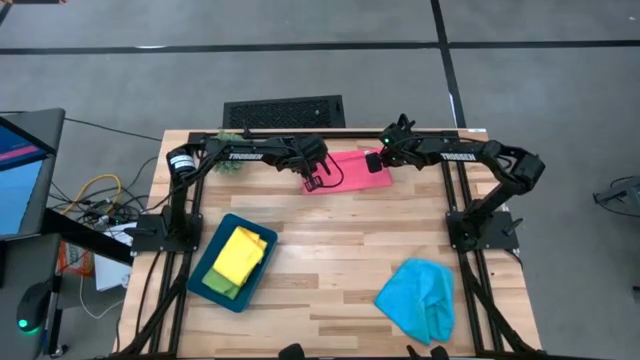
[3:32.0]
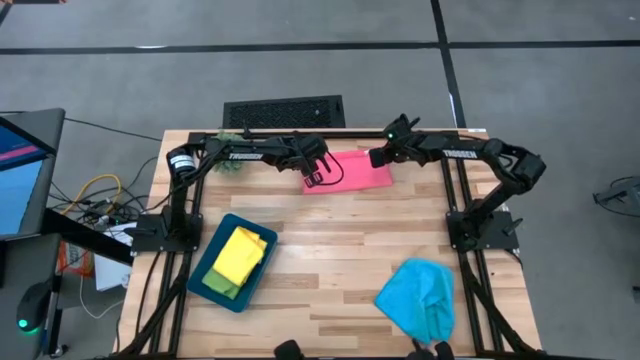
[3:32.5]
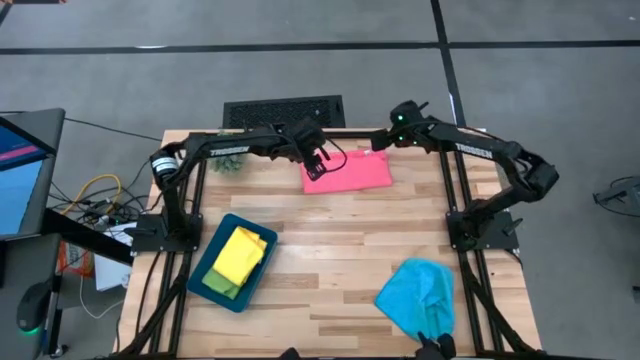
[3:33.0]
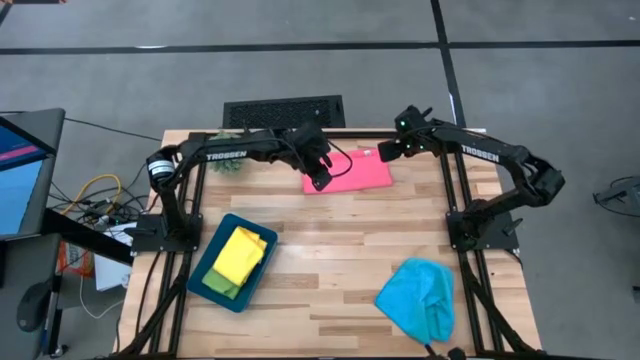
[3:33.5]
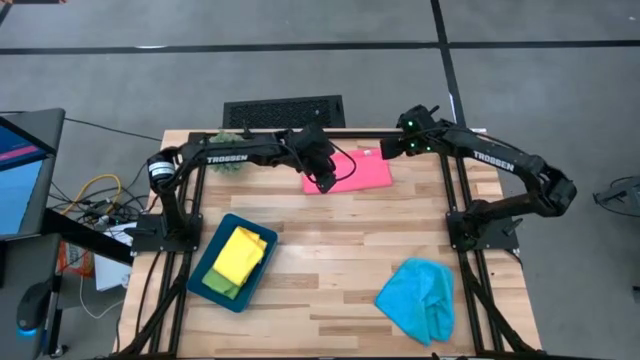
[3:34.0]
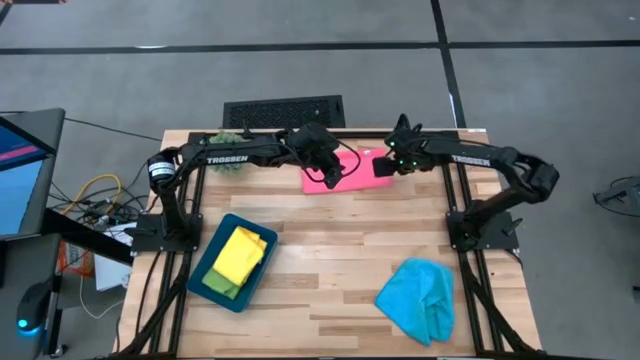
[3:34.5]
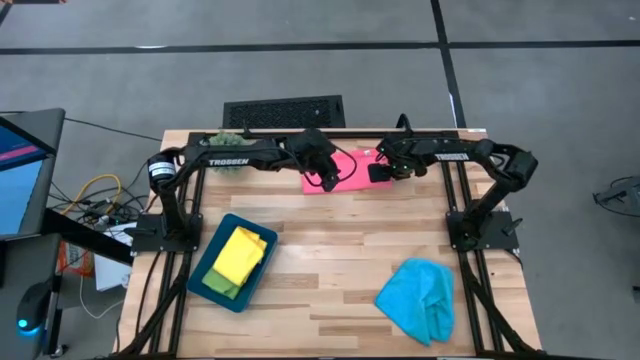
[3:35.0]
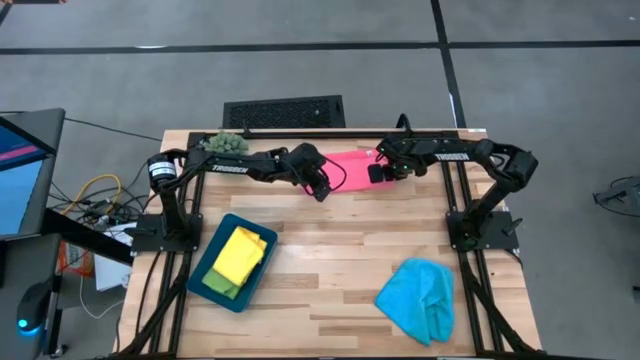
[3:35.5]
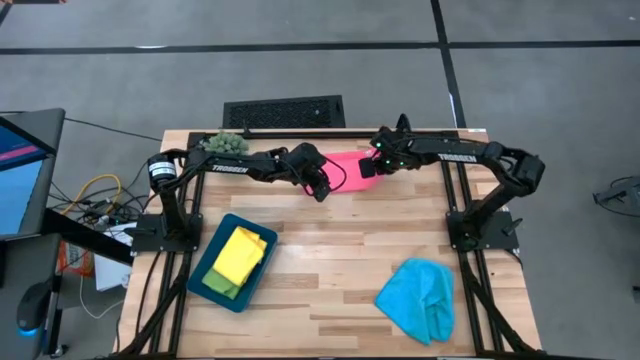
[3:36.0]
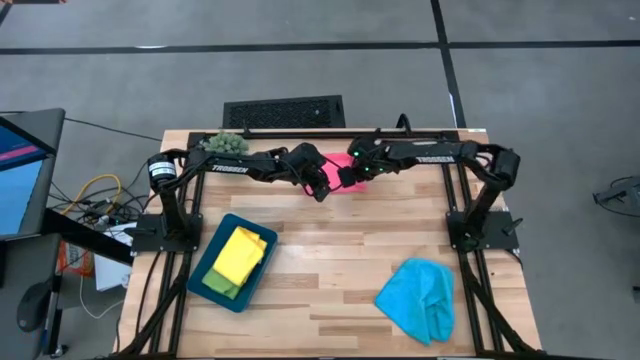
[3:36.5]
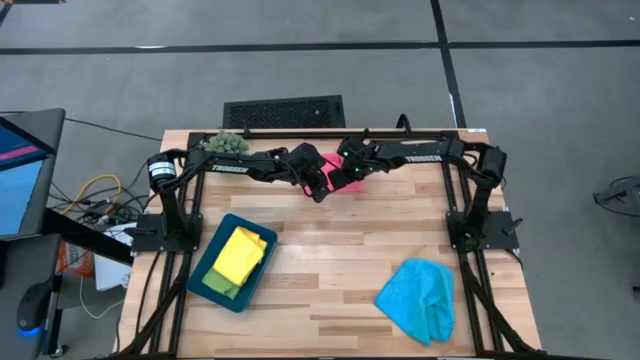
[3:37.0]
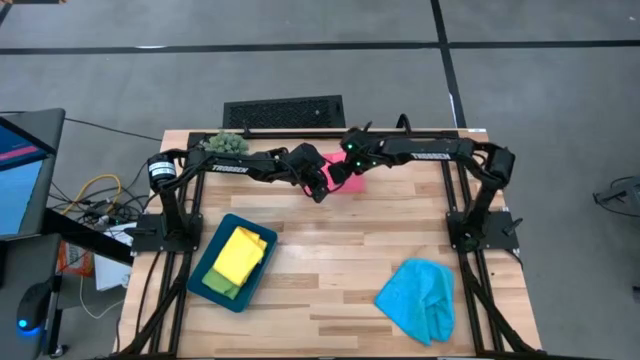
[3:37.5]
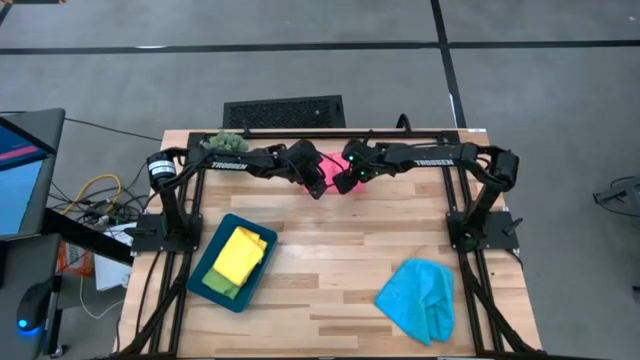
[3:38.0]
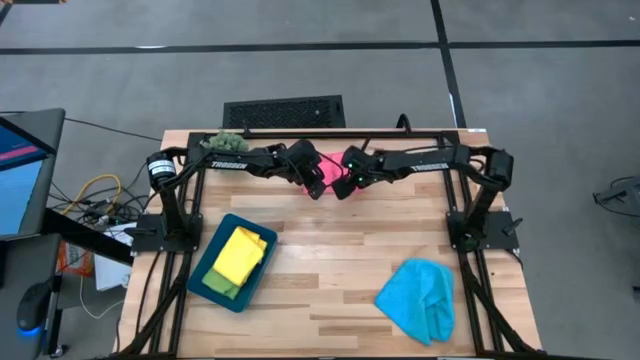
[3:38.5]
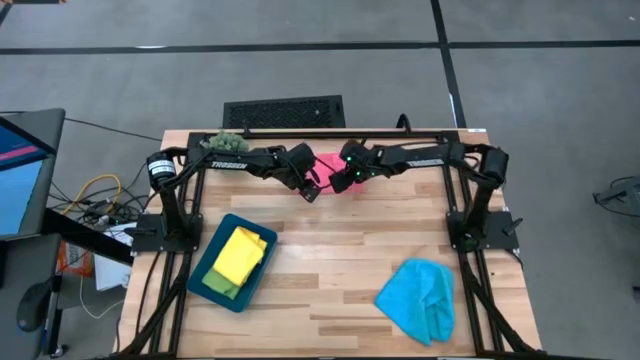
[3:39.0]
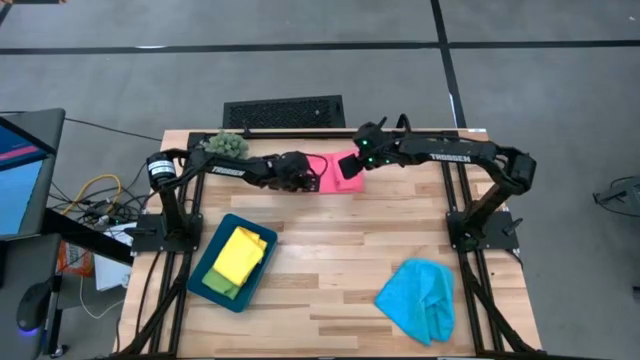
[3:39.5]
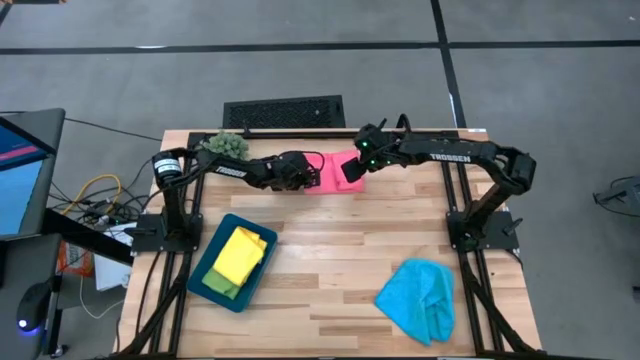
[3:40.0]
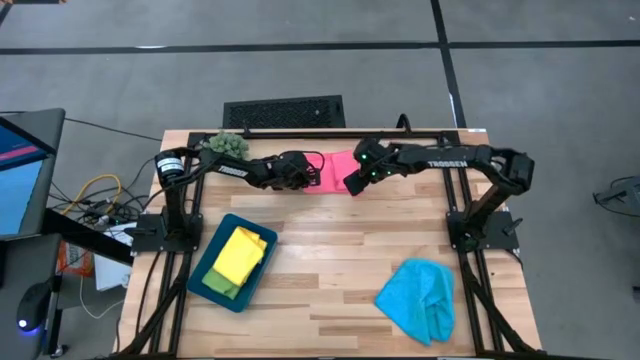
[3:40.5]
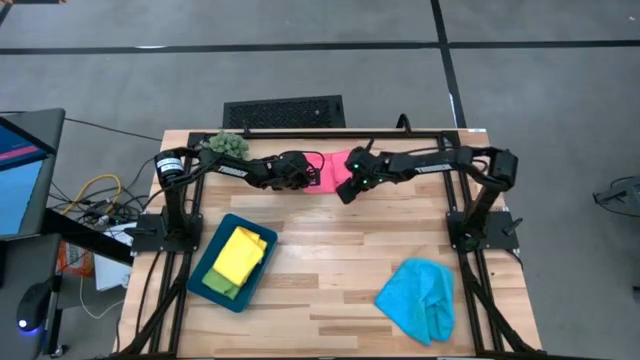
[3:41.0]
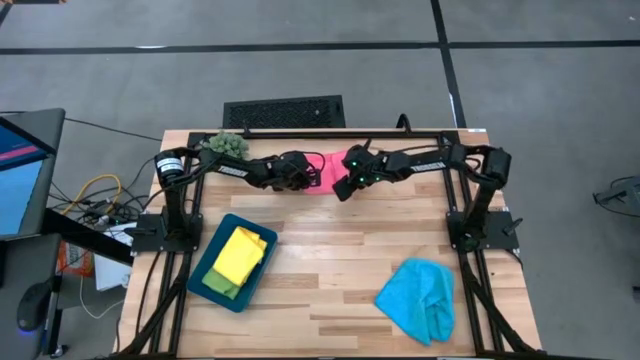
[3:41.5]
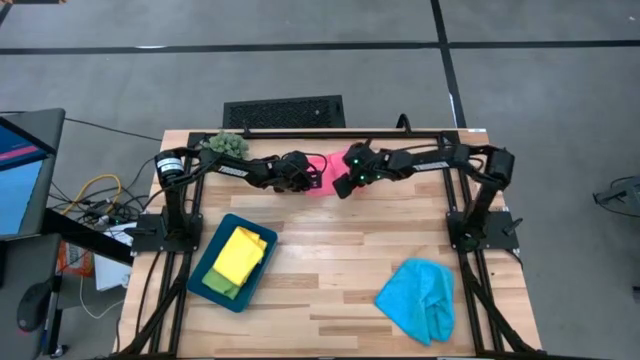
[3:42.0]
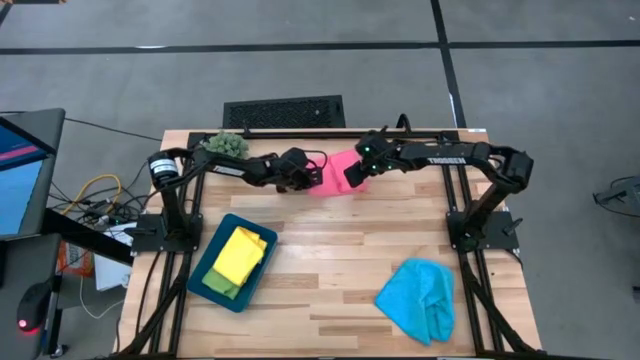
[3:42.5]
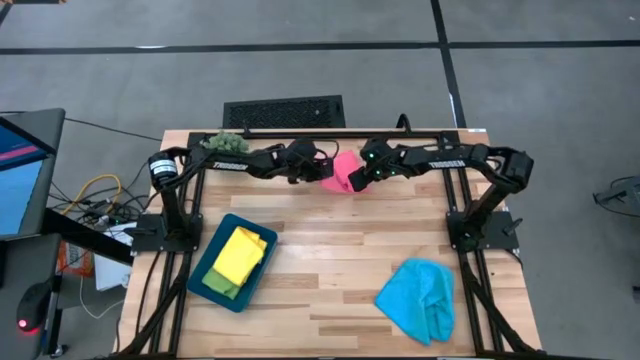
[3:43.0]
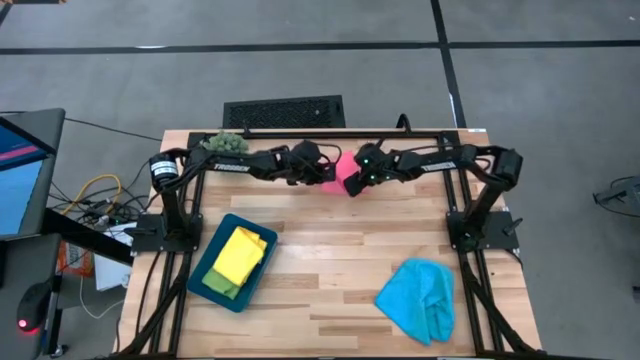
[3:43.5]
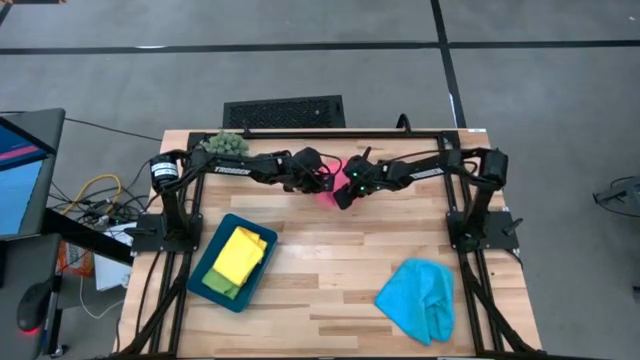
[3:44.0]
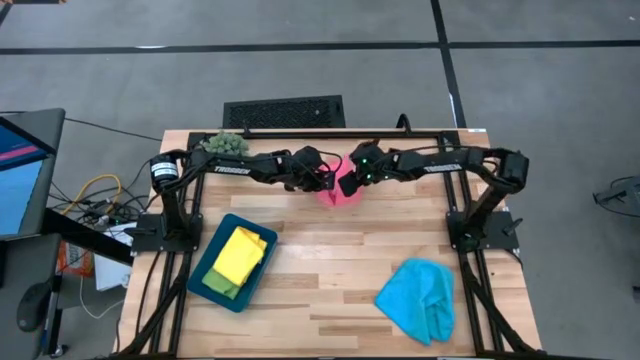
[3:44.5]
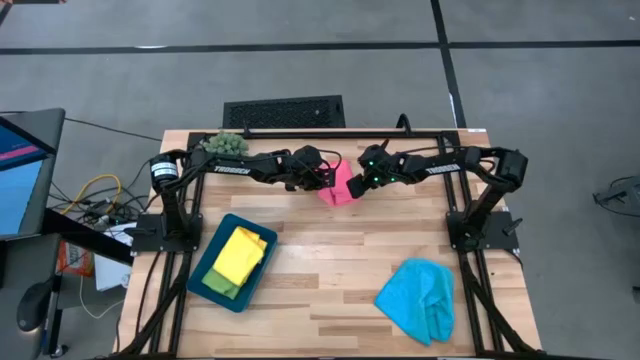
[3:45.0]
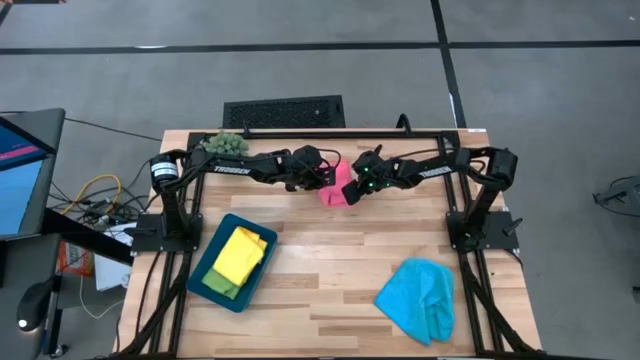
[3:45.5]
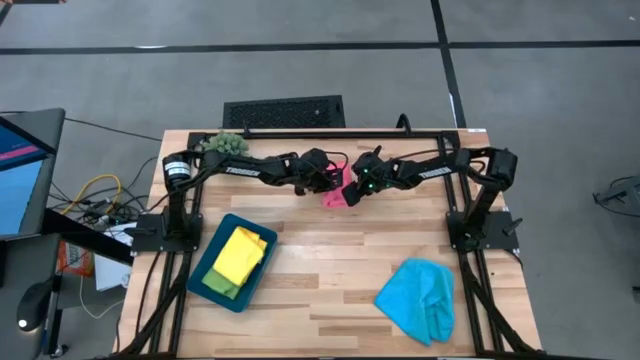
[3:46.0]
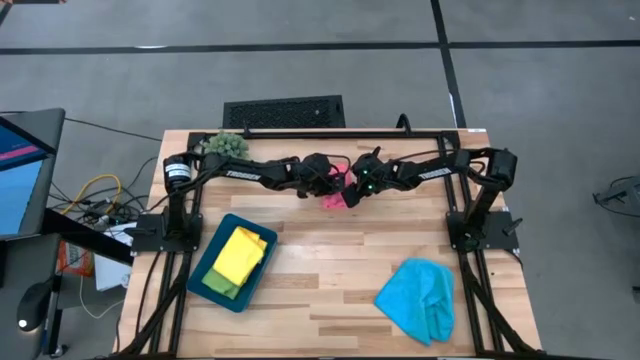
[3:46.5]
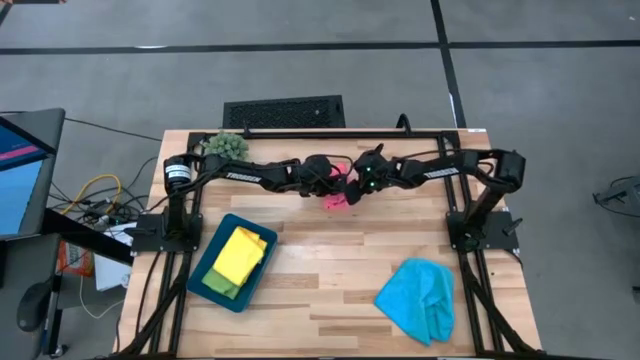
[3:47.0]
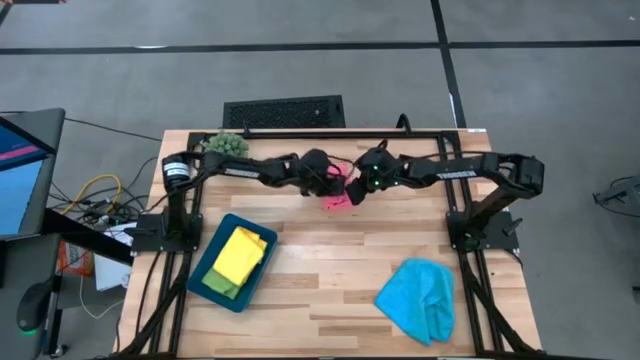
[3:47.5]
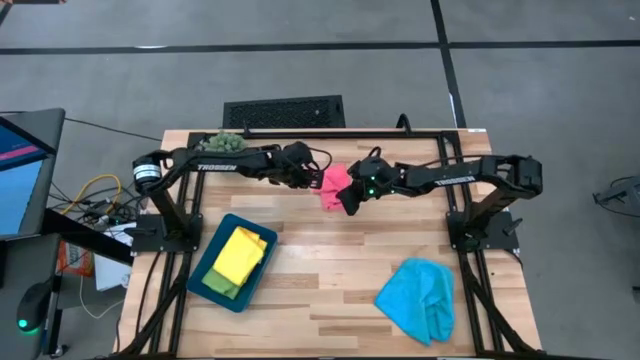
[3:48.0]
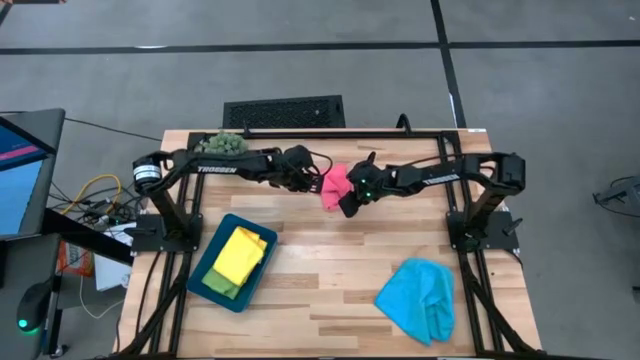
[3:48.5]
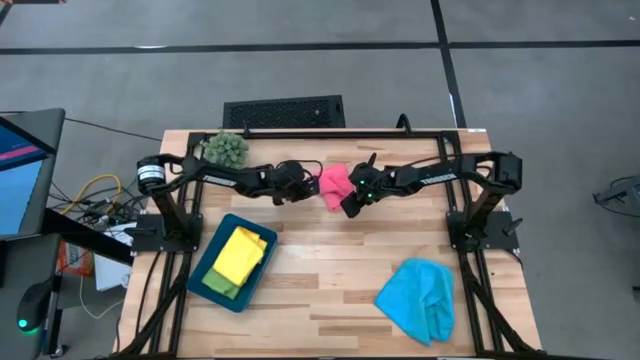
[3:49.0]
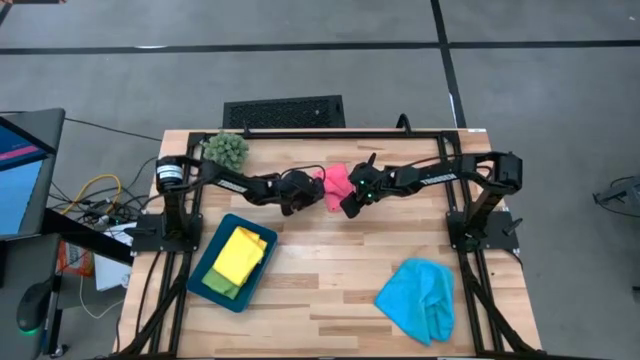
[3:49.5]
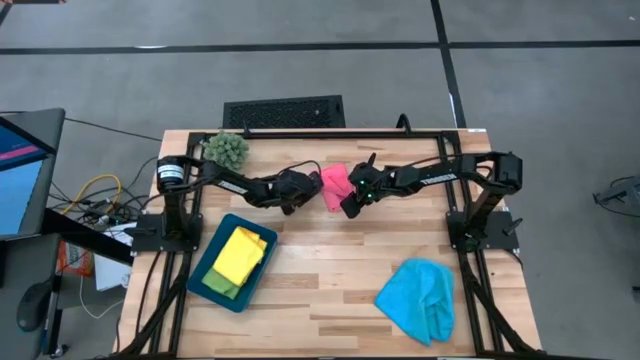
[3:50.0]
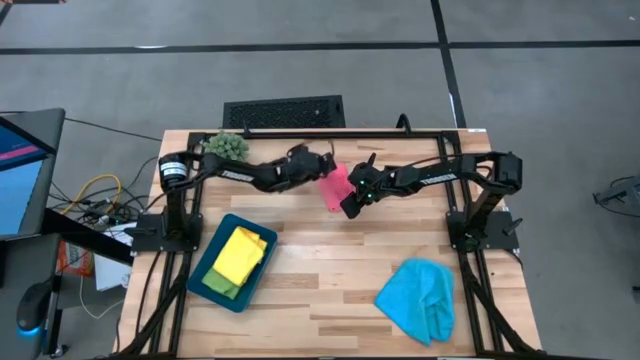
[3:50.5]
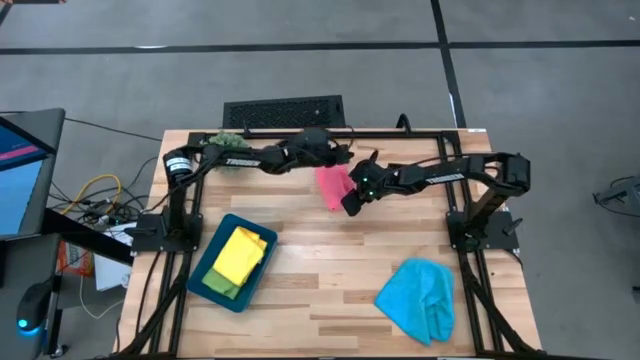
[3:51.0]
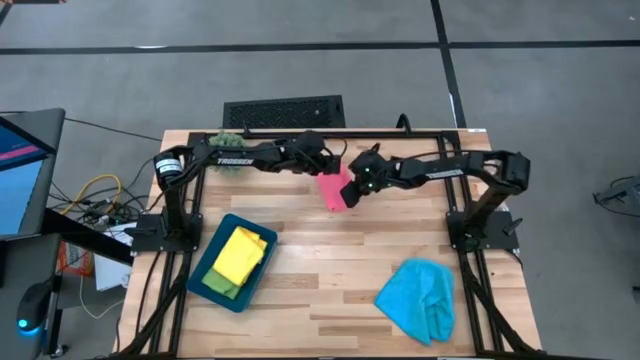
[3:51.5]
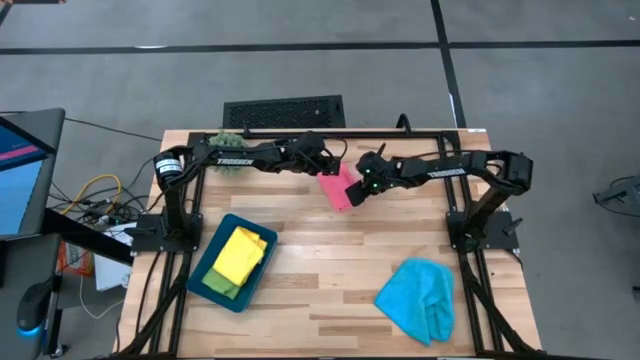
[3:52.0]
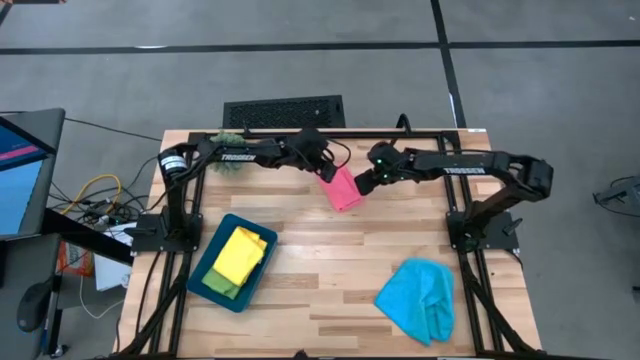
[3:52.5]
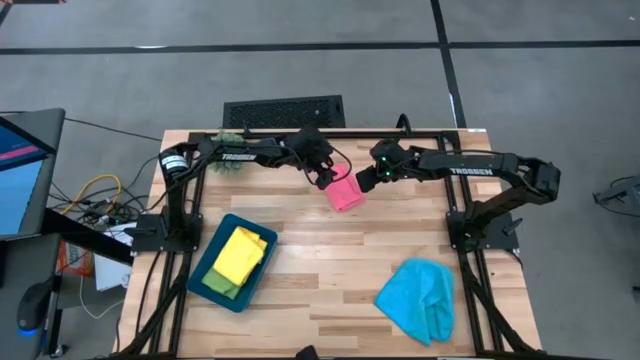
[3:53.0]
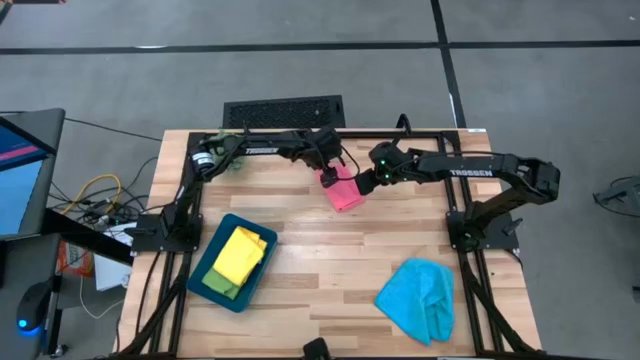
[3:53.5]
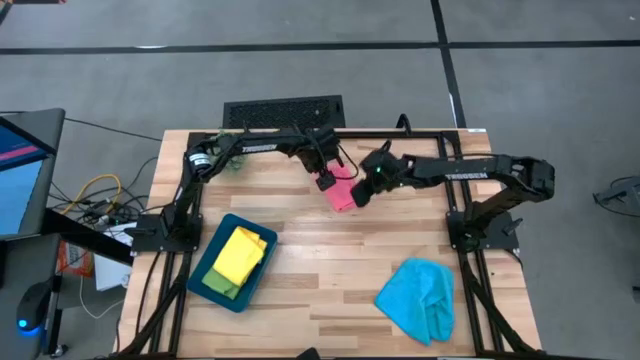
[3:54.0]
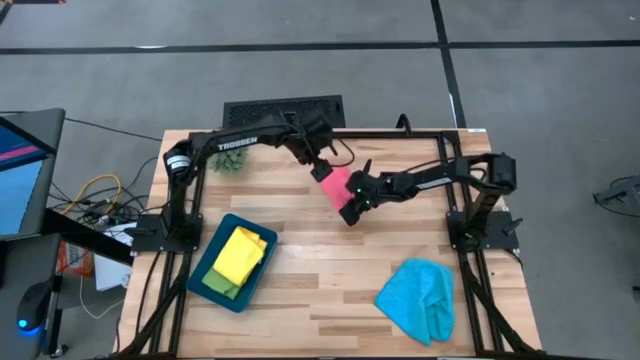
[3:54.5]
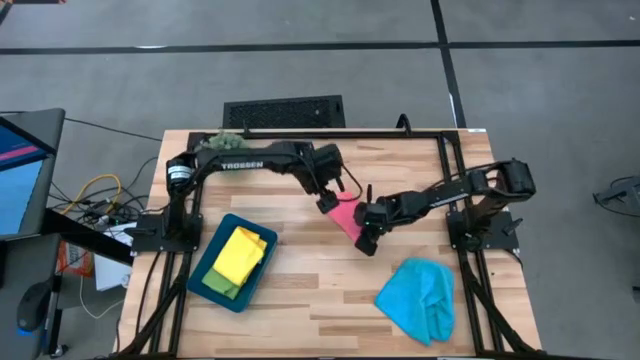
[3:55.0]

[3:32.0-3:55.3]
Task: Fold microfiber towels
Fold the pink microfiber towel
